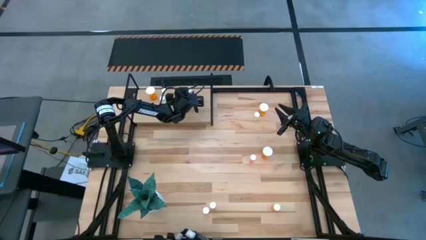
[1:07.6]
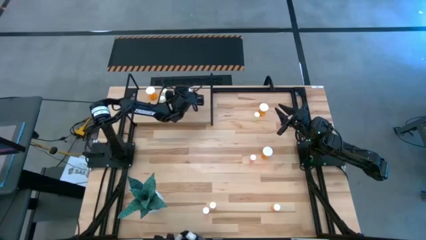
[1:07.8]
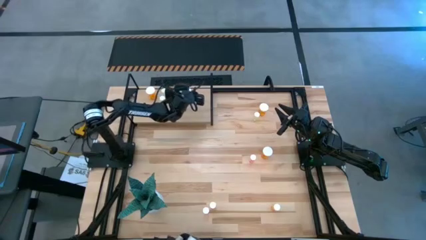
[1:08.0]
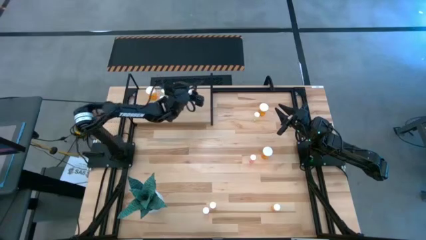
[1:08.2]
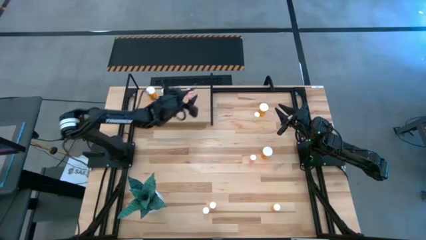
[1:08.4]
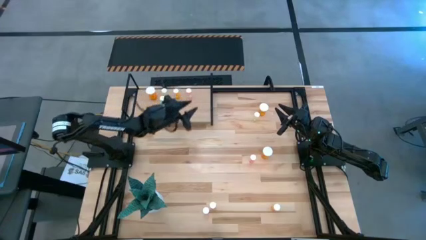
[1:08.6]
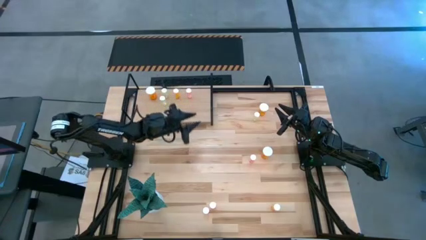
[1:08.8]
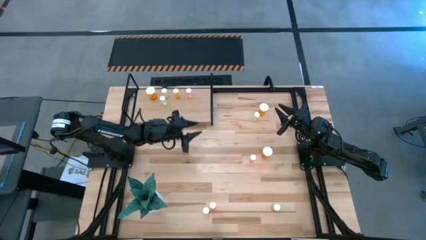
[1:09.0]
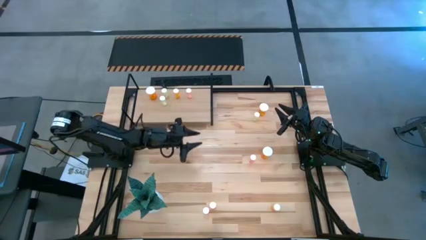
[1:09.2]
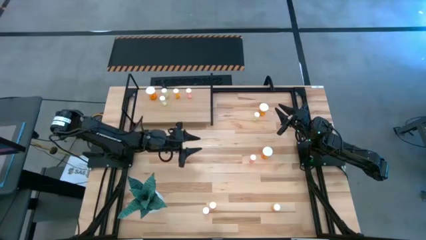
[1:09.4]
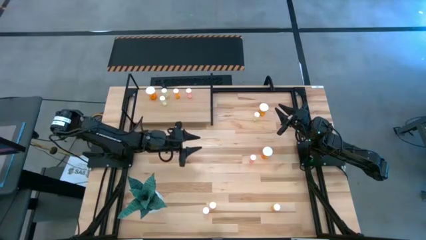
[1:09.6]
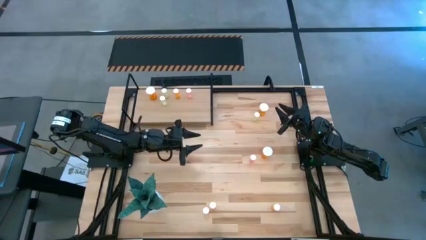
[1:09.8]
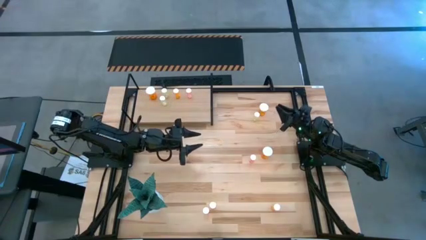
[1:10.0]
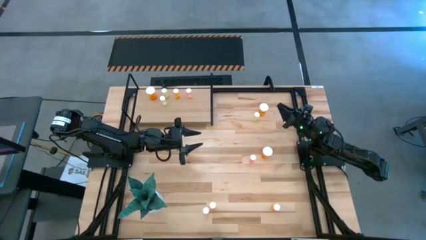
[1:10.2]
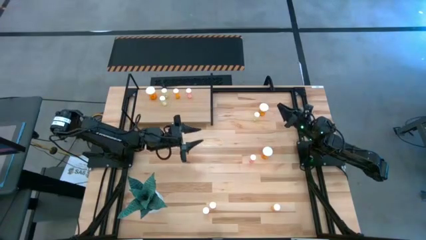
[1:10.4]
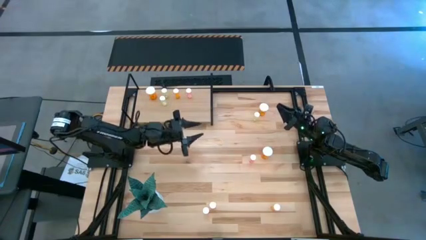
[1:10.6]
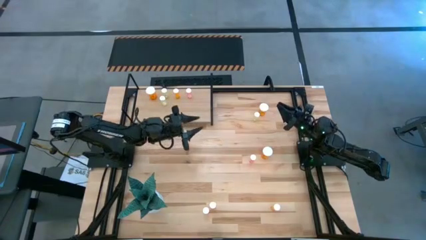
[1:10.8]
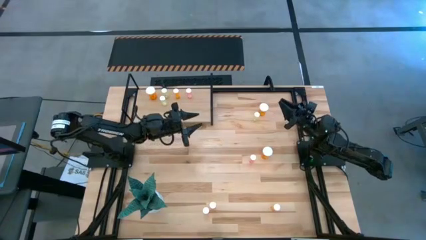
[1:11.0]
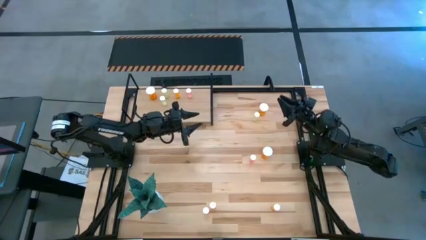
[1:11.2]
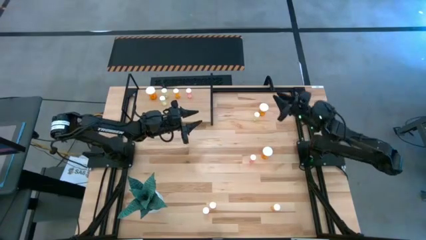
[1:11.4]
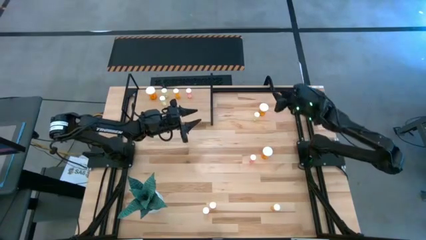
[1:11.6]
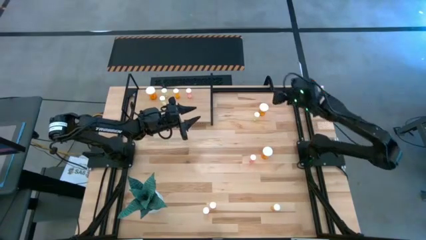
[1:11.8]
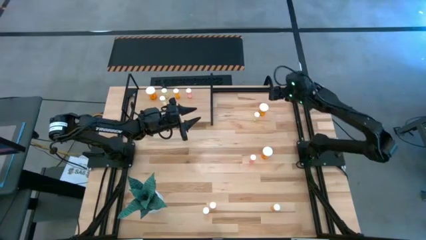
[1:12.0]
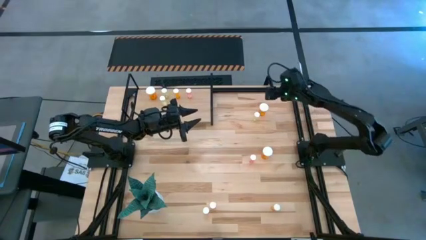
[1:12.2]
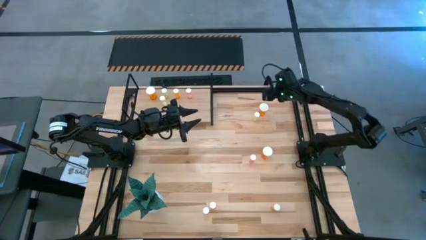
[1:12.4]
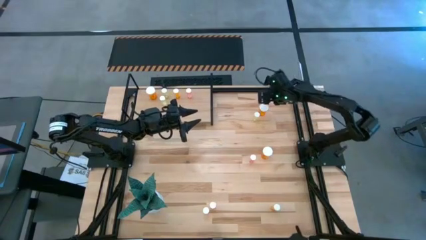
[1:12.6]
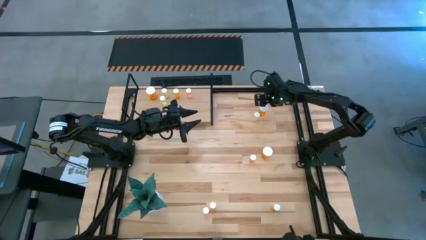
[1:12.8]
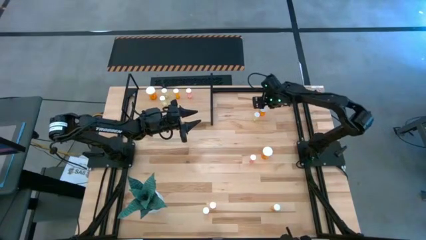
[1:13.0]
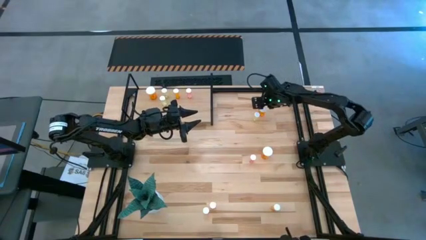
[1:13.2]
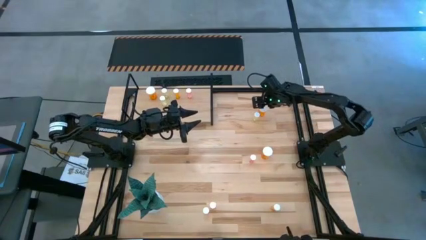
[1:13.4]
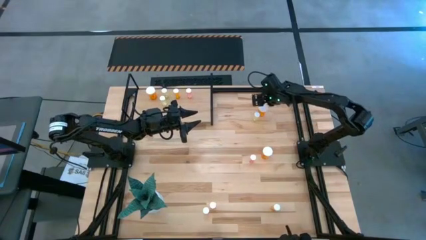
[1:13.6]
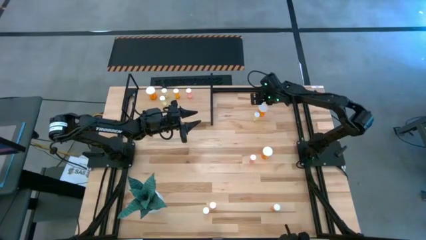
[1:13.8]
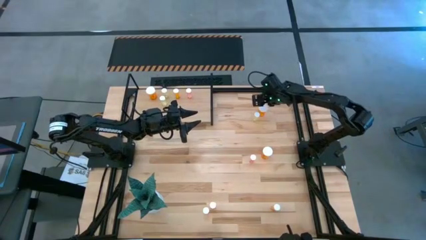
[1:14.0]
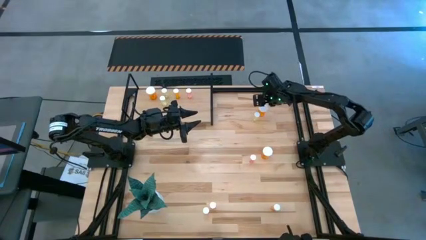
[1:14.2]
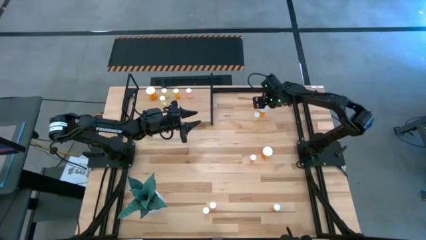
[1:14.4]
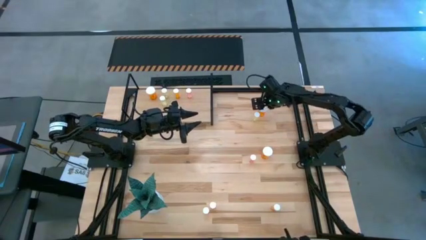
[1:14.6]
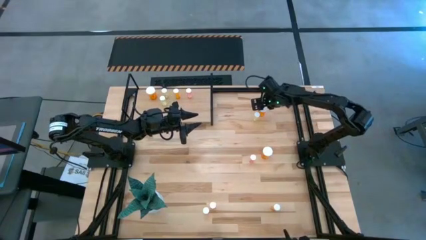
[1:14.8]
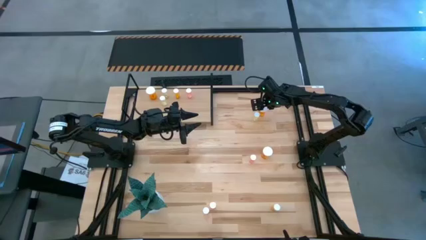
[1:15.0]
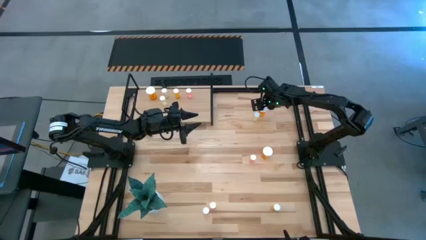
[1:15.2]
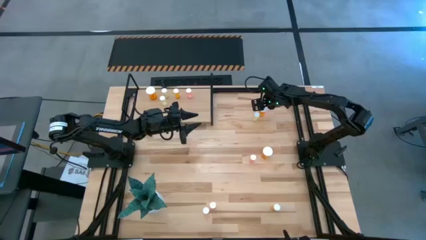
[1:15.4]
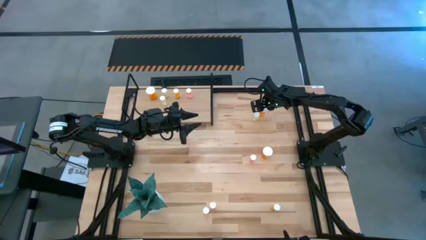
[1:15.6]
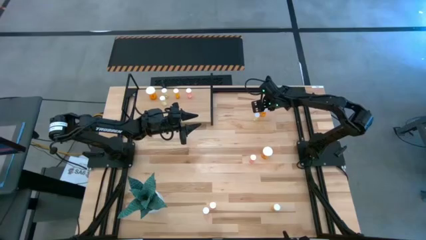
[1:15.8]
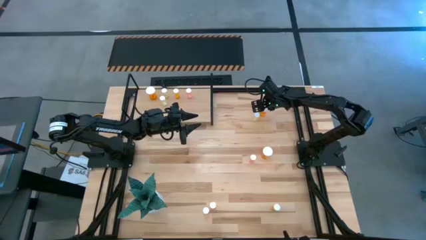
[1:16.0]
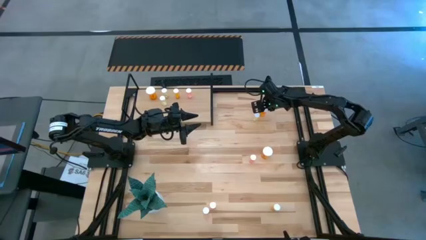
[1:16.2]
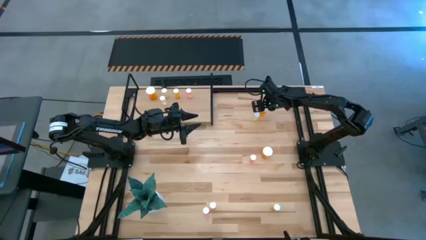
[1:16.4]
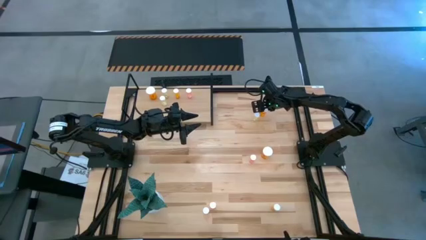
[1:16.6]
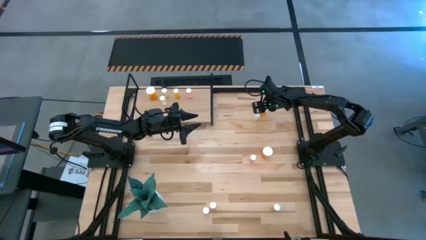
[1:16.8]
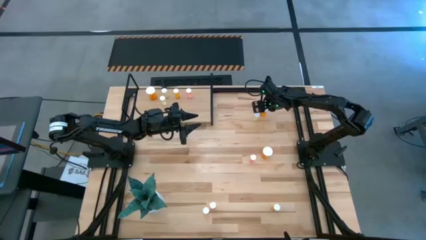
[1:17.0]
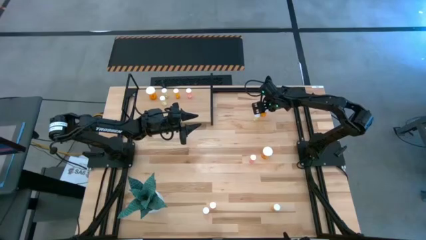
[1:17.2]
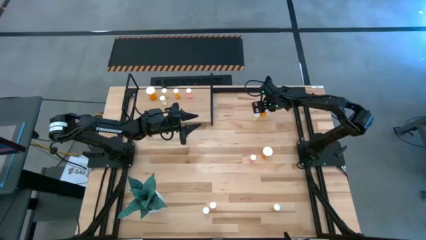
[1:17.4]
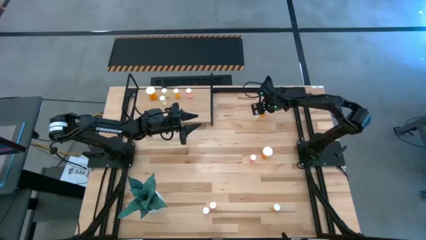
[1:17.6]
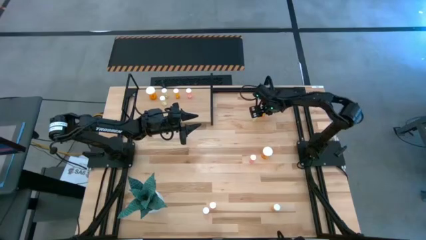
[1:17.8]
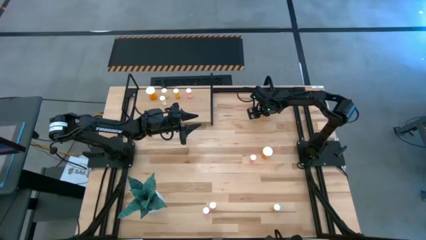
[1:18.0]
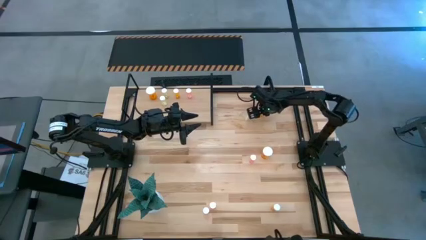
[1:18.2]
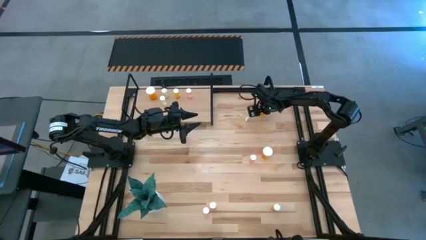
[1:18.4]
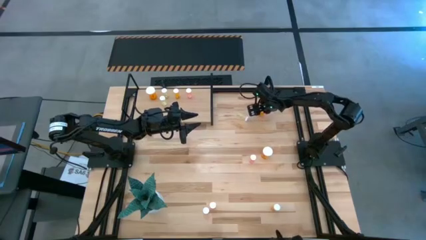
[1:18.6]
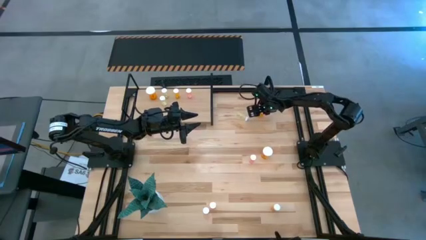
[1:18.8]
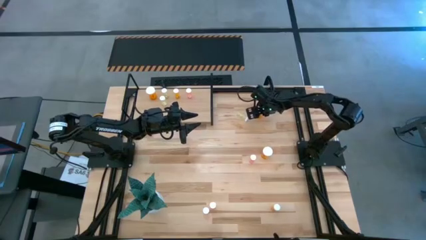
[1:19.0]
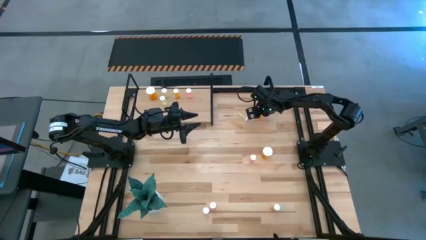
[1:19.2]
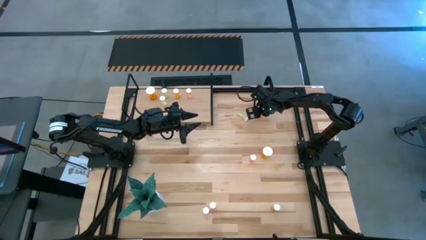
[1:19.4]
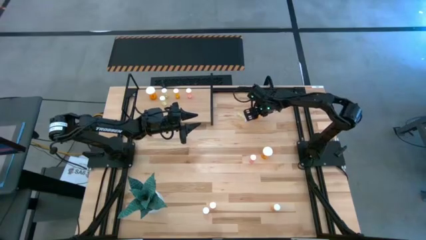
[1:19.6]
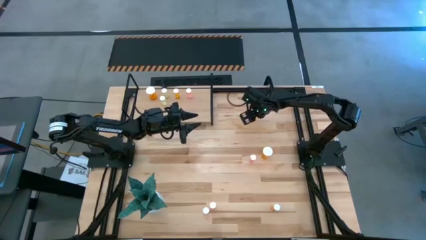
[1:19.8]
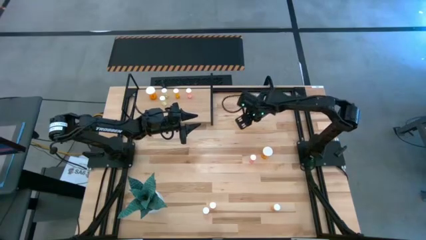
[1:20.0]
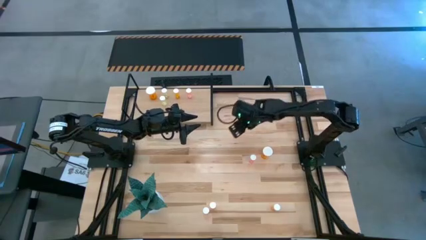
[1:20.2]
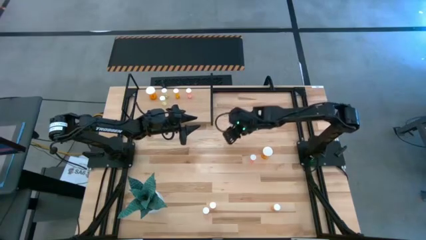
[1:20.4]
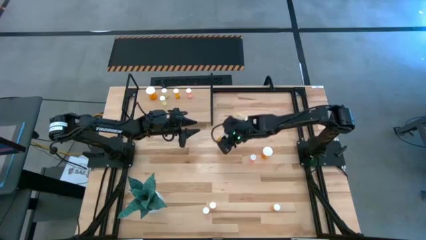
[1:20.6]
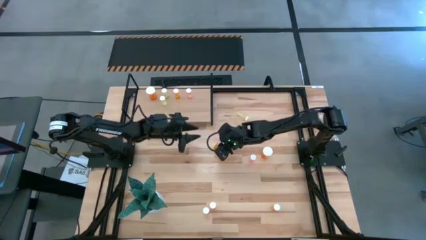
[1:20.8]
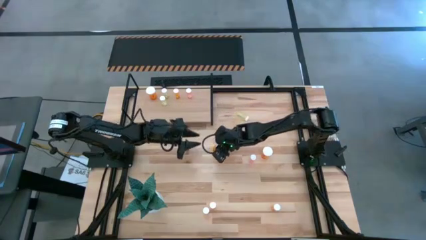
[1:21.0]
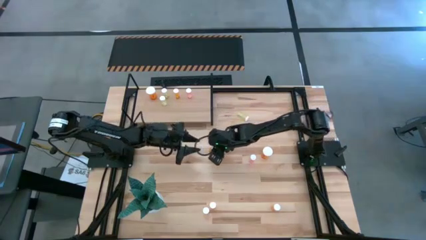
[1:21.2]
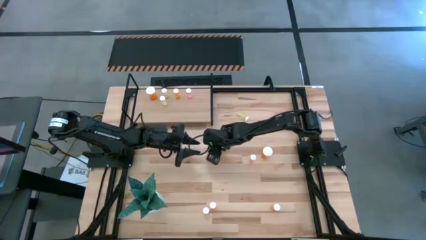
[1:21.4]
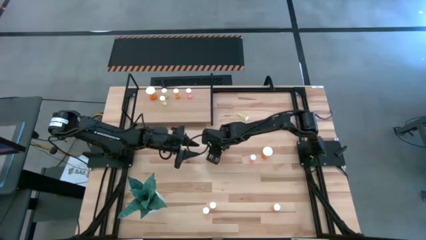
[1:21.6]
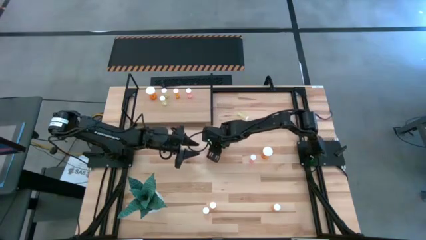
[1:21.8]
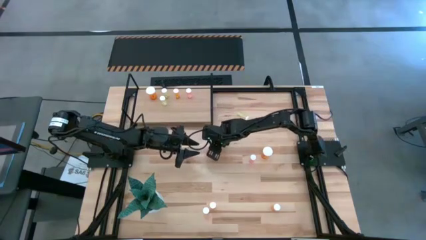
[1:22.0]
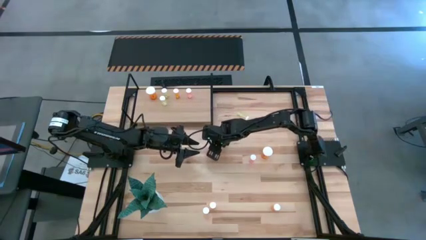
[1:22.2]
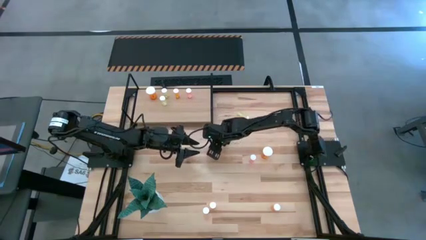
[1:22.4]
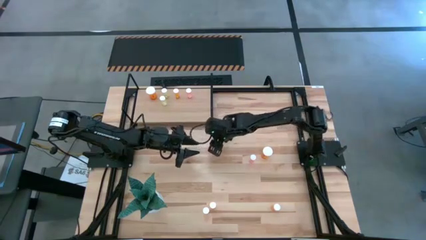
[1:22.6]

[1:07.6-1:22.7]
Task: Pick and place medicine bottles onto shelf by color
Move the top big orange pill bottle to the middle of the table
